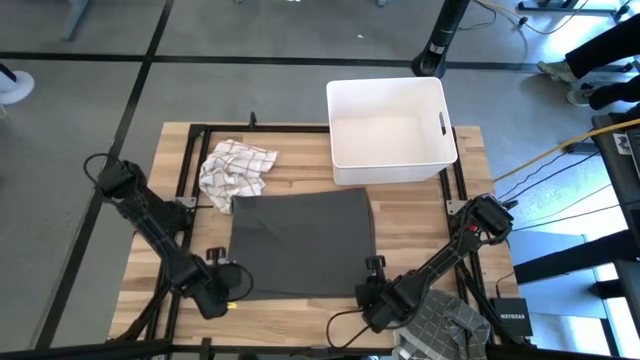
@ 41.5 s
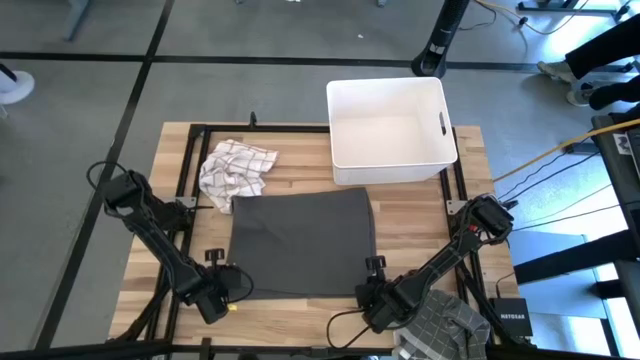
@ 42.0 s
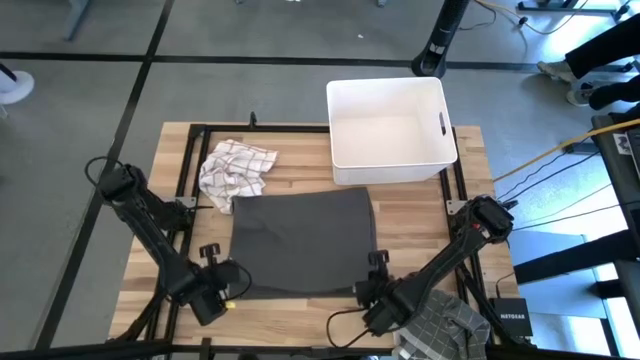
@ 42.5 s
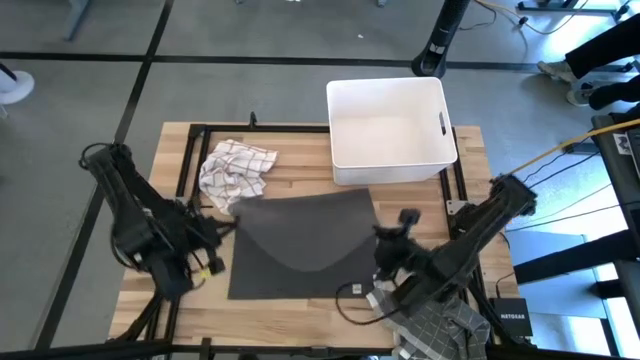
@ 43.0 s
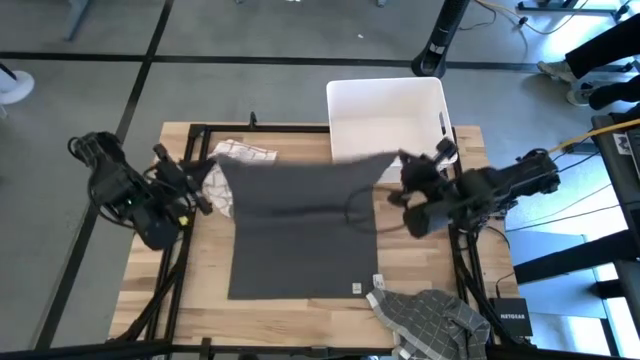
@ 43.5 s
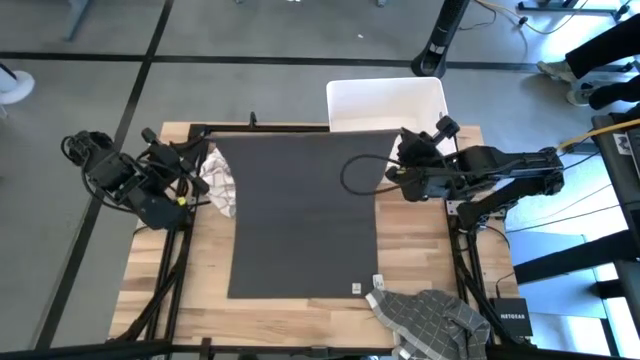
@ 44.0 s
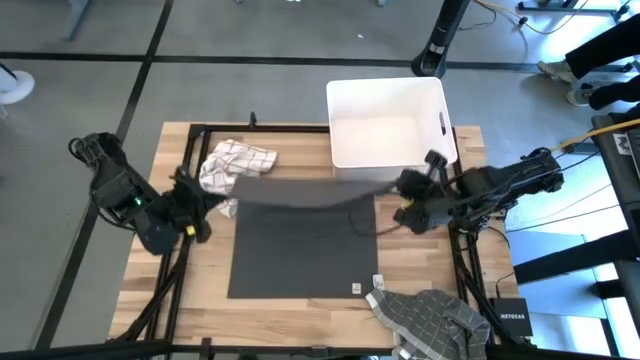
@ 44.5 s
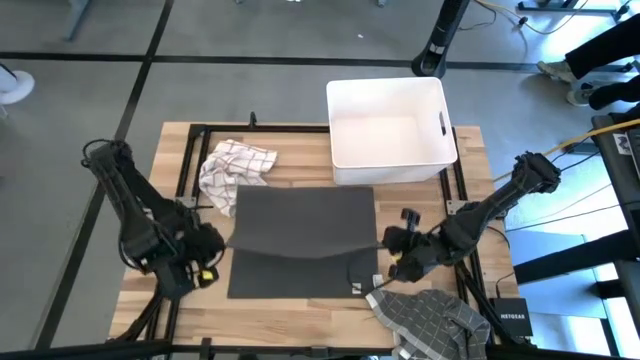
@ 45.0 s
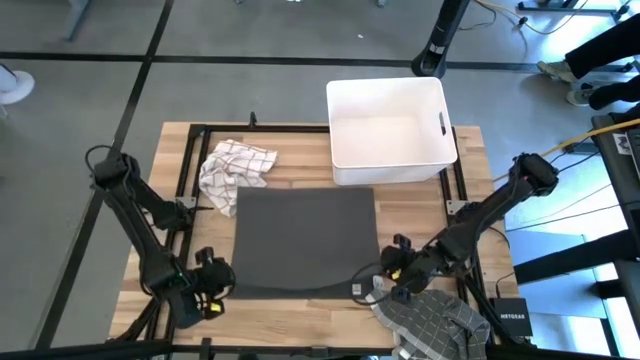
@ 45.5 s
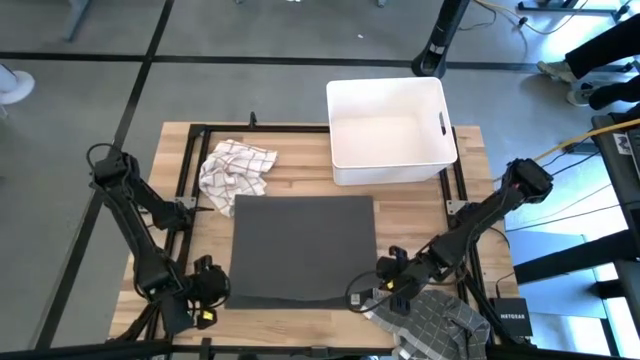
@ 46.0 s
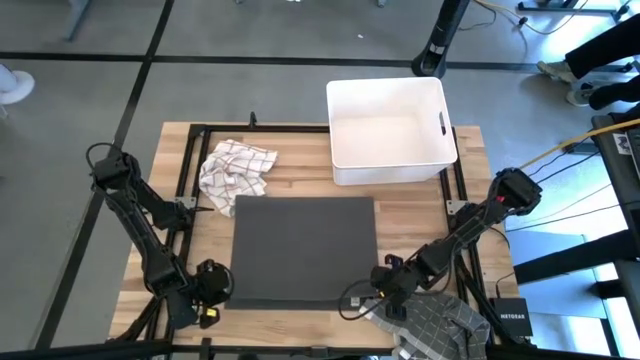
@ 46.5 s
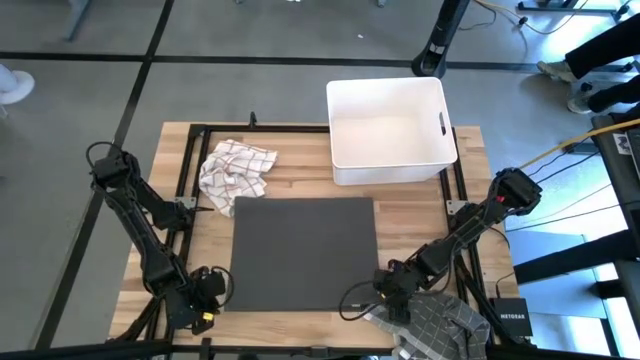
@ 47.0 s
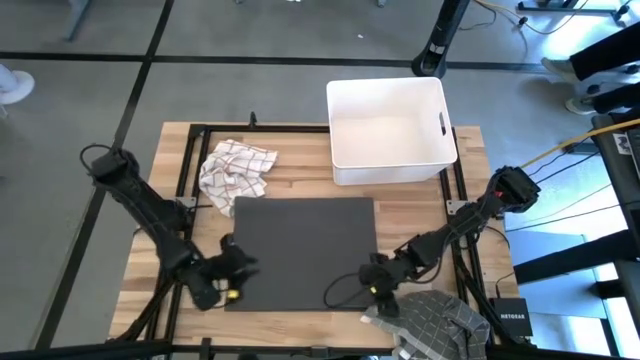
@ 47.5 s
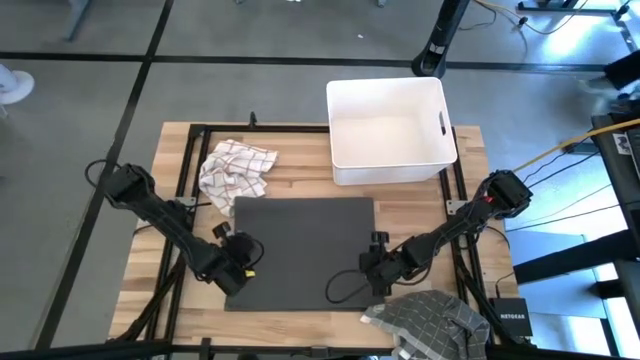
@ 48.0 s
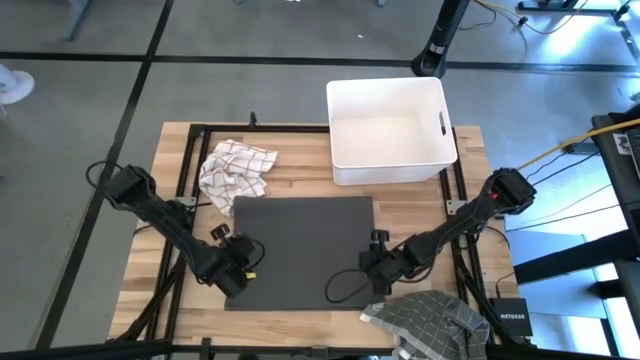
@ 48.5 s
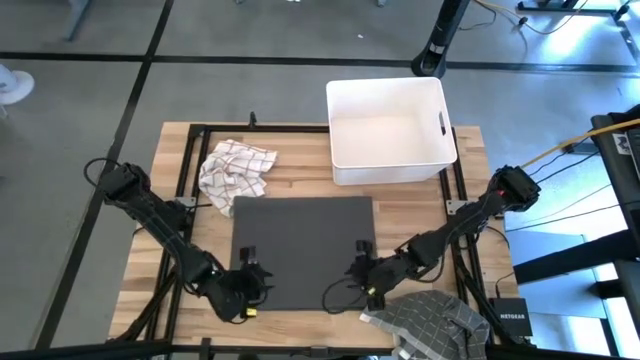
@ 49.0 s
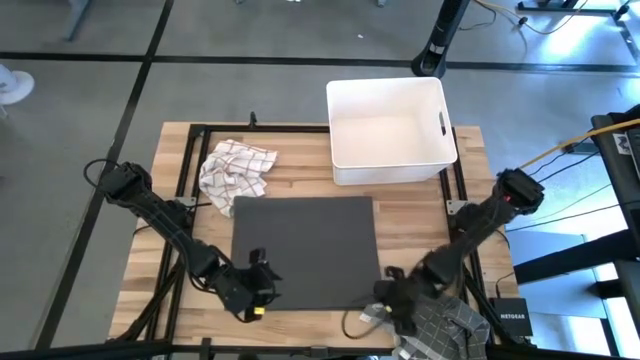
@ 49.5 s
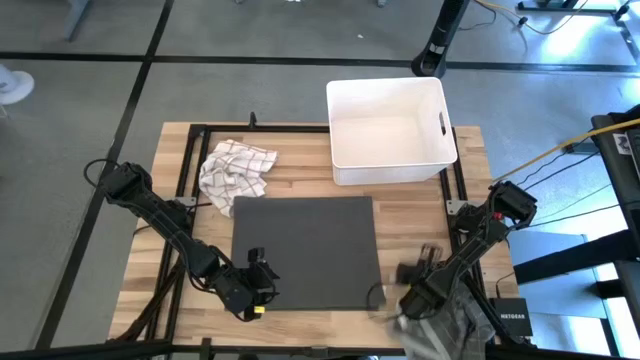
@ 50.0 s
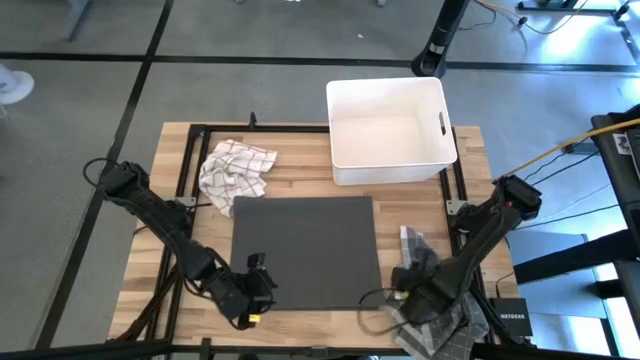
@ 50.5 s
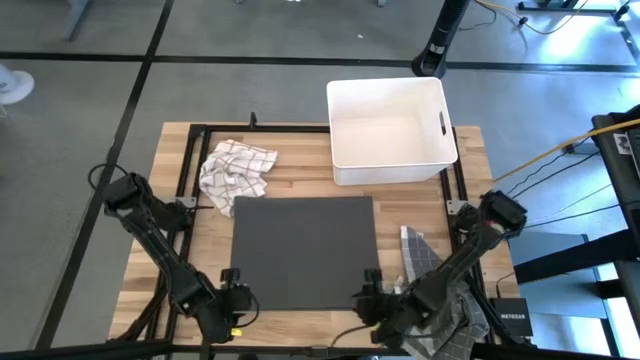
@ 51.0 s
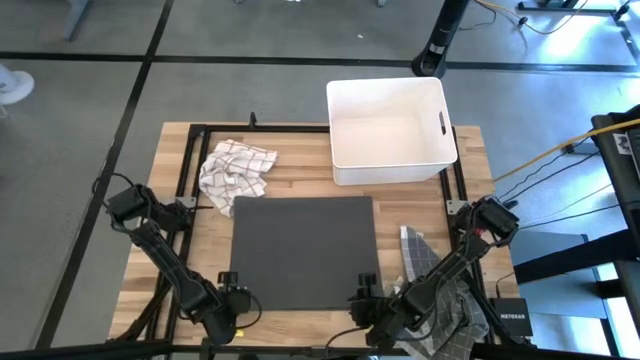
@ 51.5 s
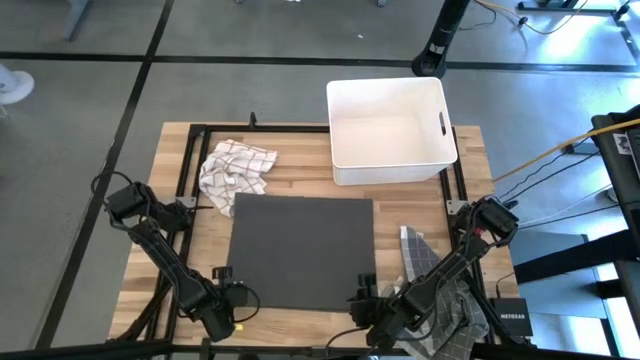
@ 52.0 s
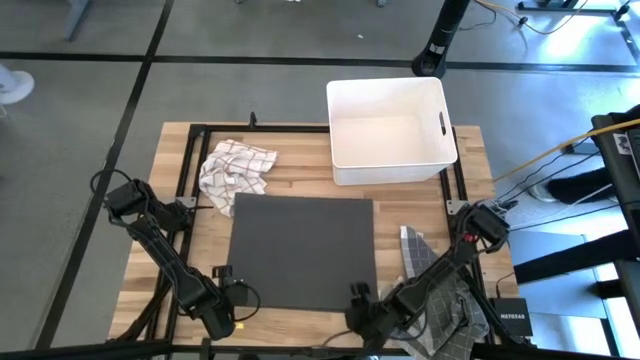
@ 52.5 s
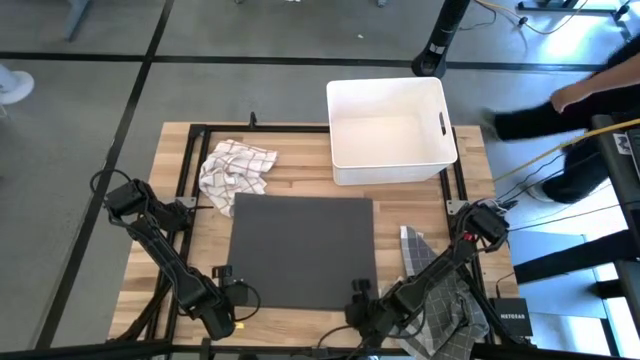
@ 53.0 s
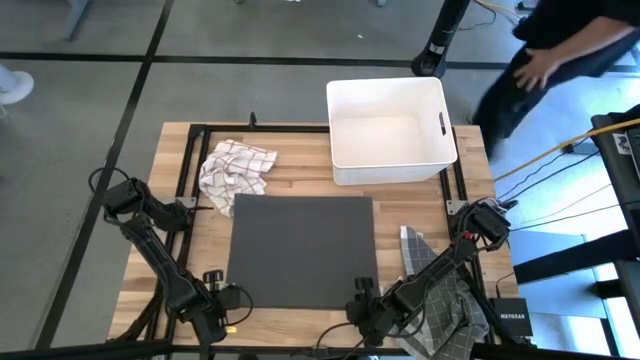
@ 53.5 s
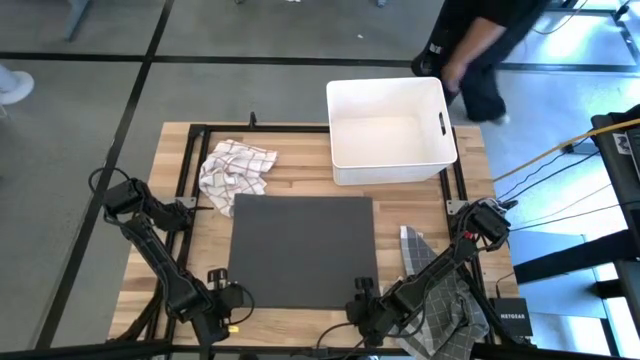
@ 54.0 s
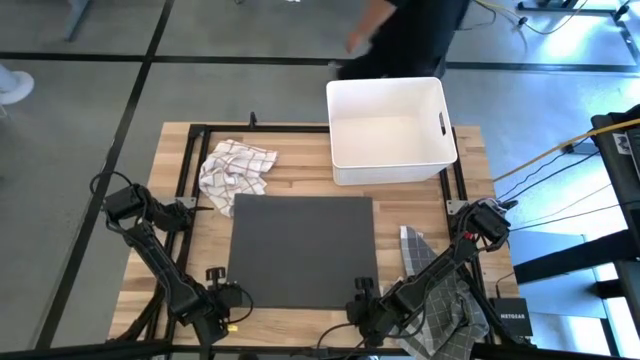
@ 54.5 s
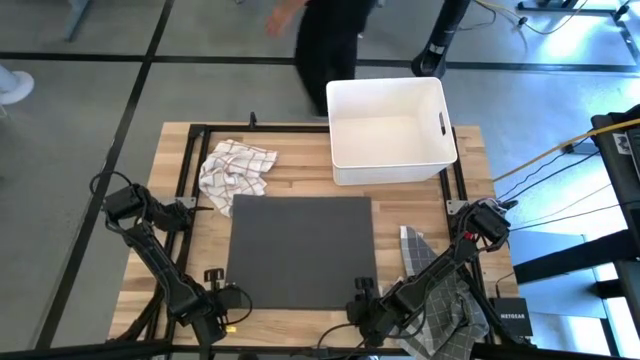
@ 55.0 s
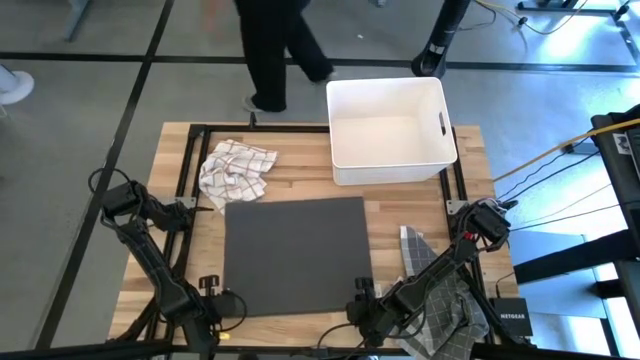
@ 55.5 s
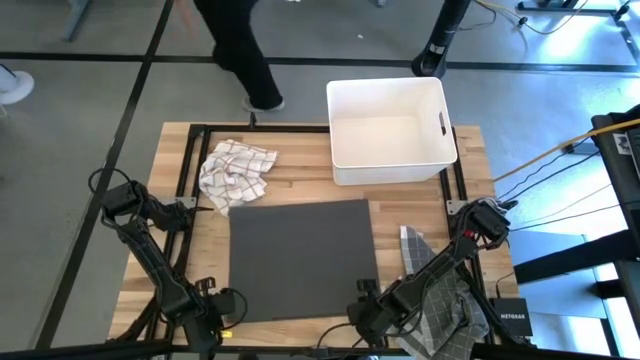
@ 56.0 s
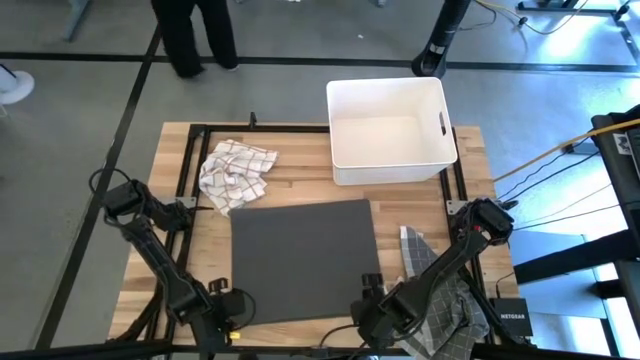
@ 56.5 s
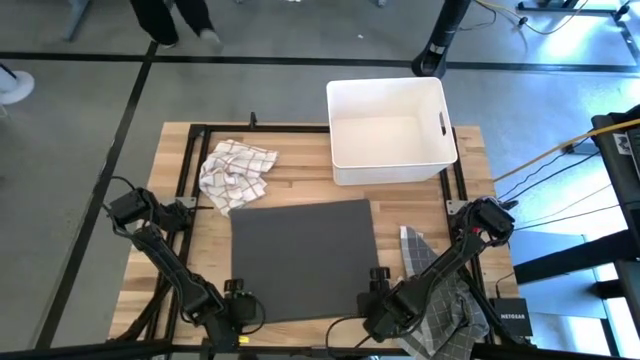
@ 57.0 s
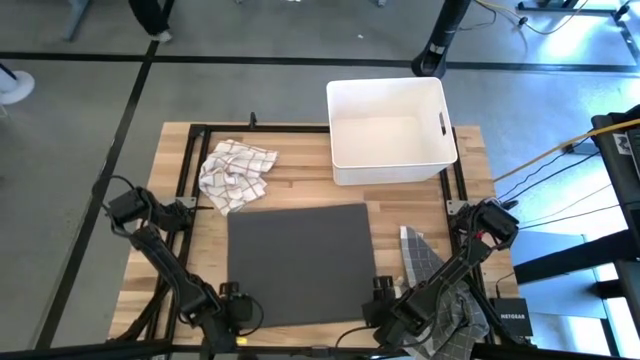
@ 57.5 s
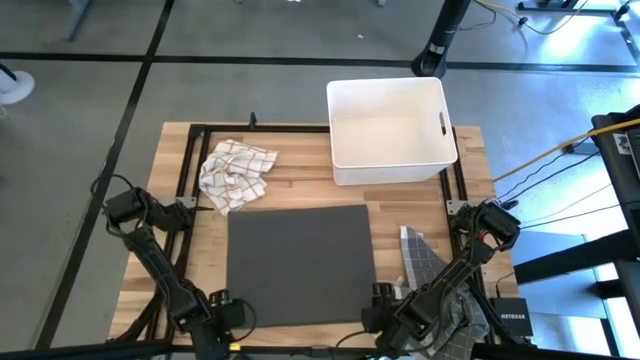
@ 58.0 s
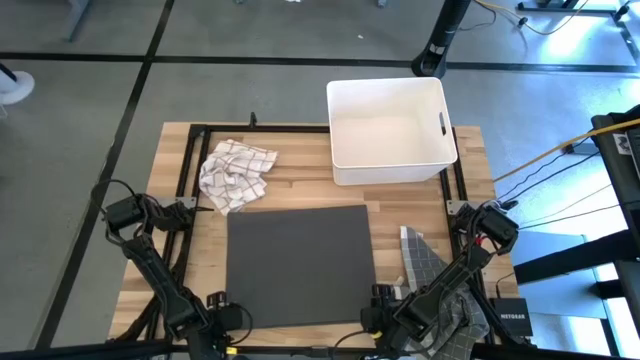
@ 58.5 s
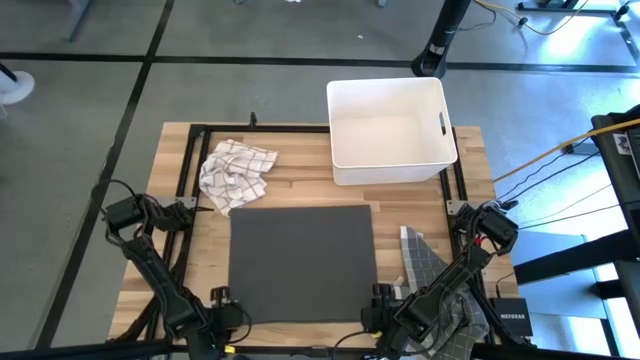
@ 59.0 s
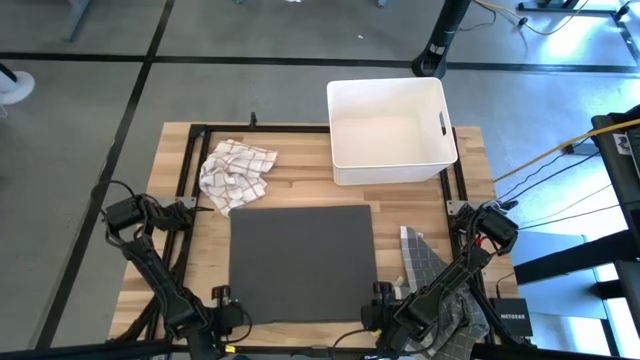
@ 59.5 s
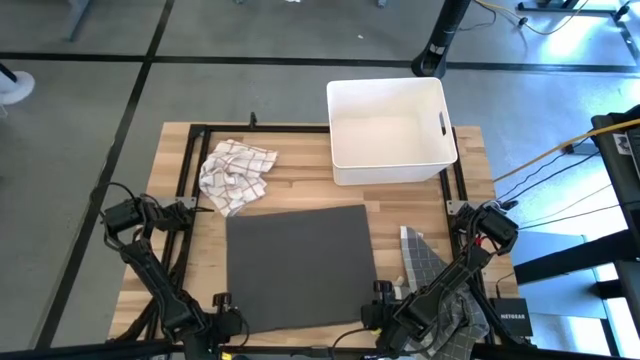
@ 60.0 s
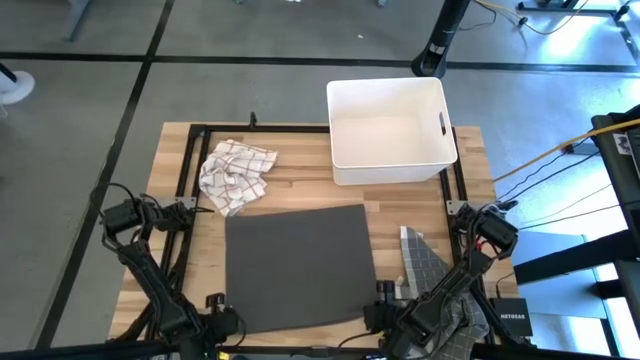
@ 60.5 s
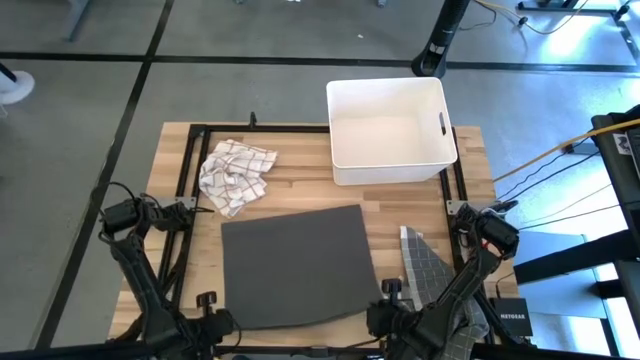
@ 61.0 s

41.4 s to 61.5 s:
Task: Fold towel
Fold the gray towel

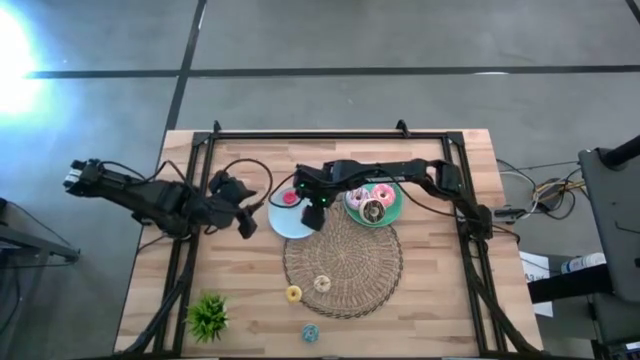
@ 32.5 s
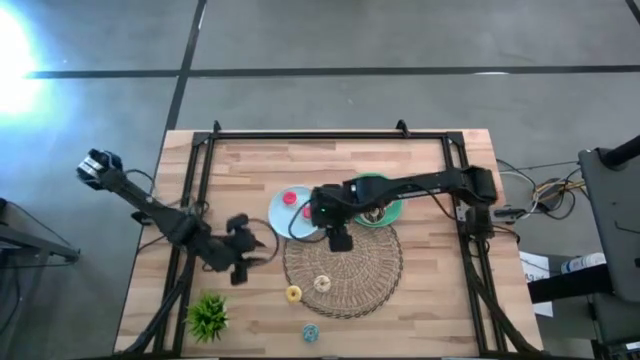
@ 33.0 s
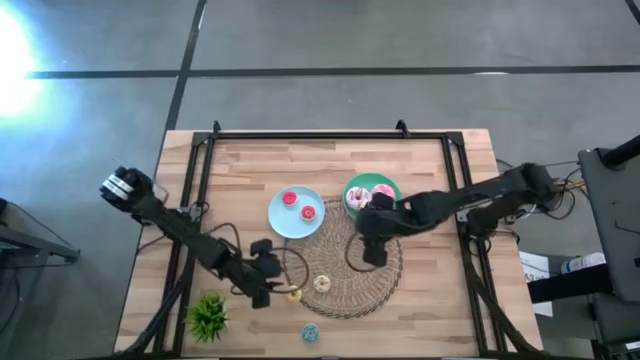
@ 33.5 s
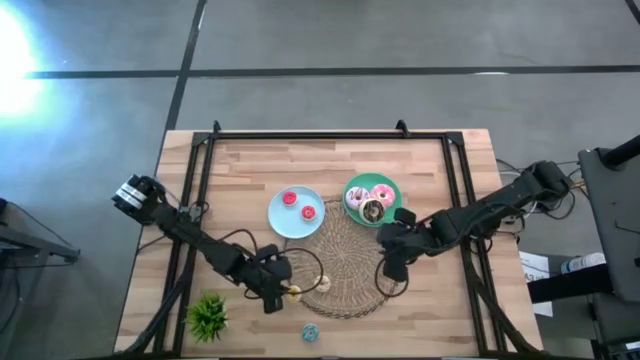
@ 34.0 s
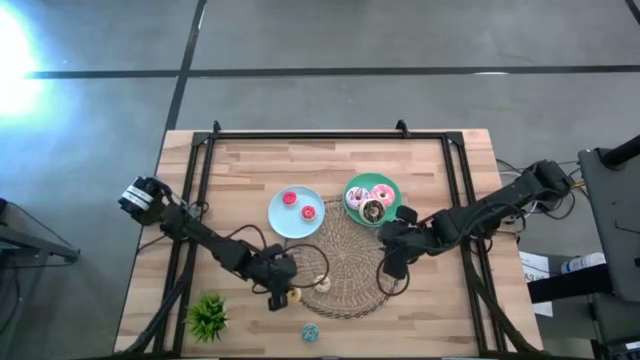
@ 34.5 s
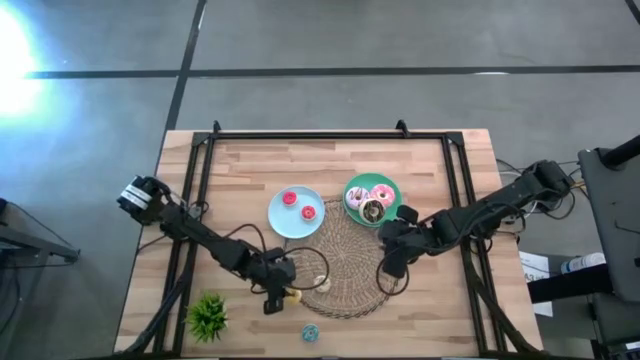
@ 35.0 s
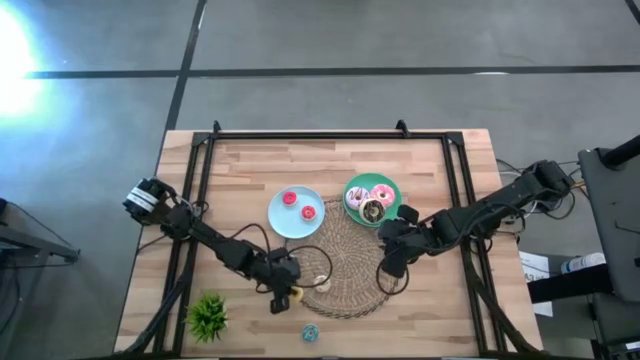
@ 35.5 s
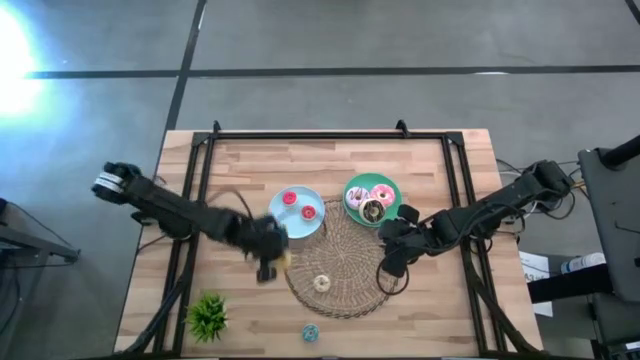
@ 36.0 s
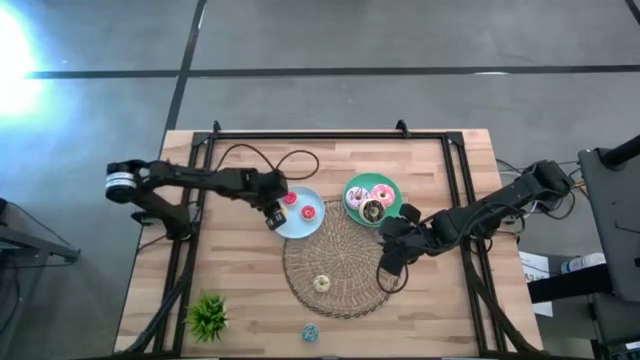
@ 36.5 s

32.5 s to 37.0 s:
Task: Pick & Place donuts
Put the small yellow donut on the blue plate
